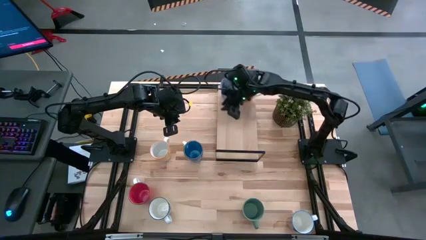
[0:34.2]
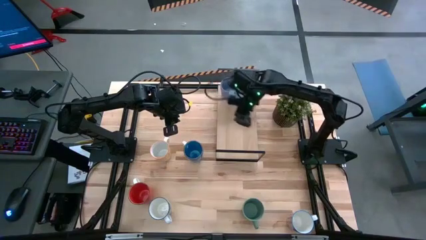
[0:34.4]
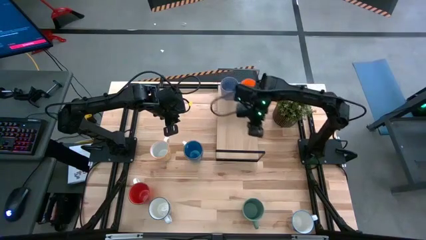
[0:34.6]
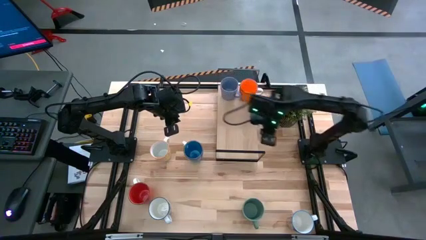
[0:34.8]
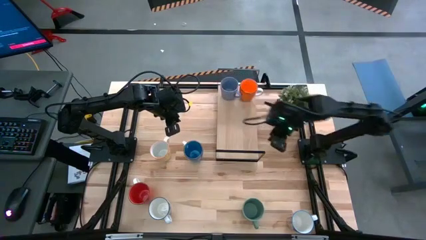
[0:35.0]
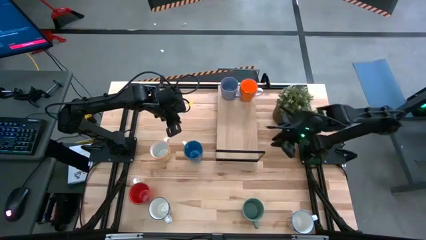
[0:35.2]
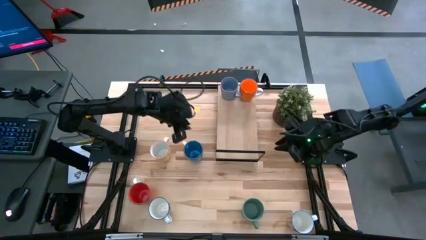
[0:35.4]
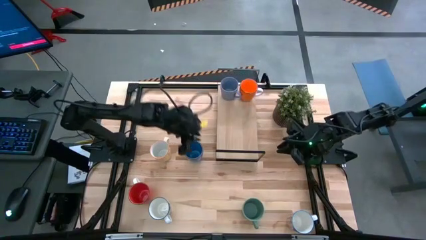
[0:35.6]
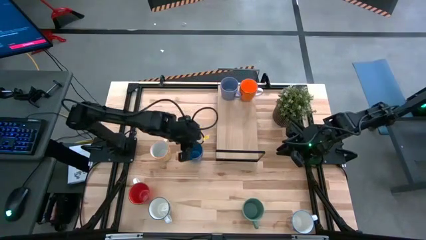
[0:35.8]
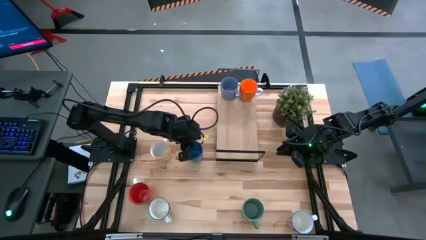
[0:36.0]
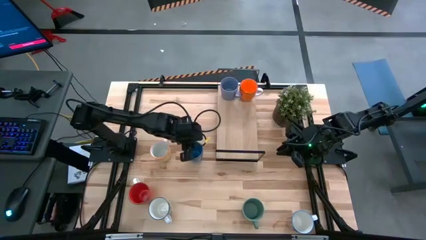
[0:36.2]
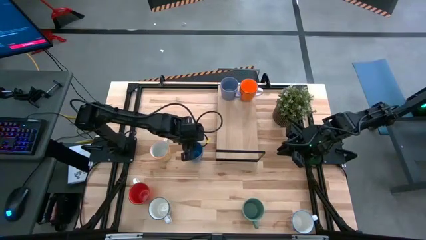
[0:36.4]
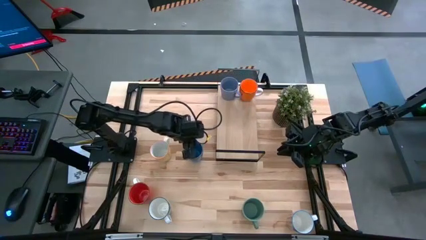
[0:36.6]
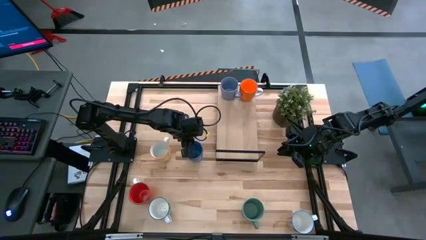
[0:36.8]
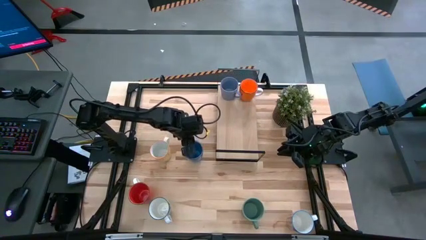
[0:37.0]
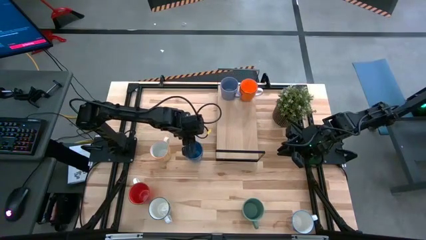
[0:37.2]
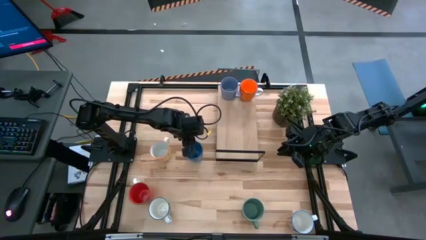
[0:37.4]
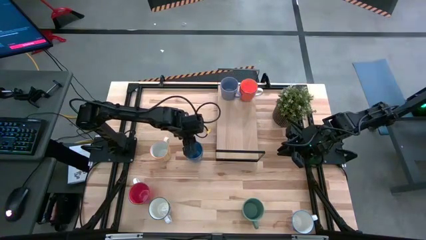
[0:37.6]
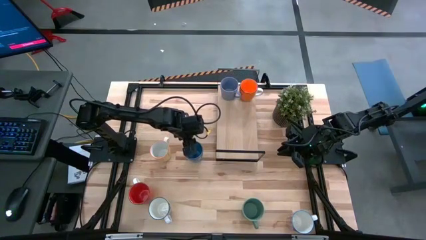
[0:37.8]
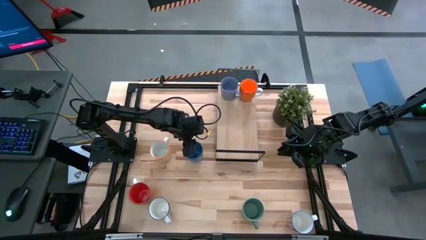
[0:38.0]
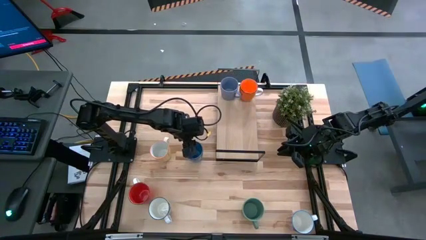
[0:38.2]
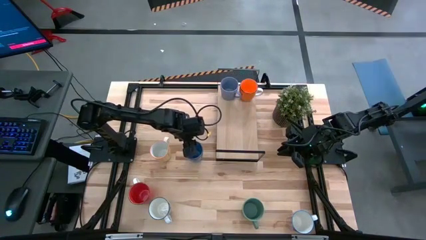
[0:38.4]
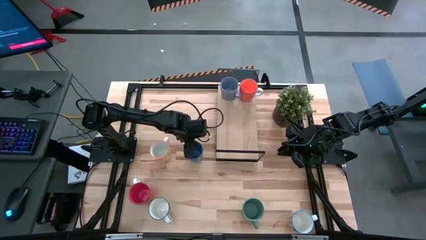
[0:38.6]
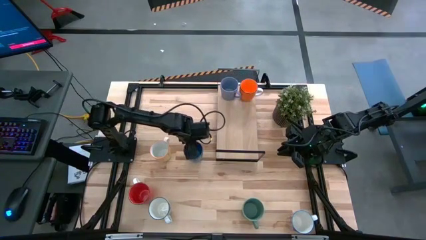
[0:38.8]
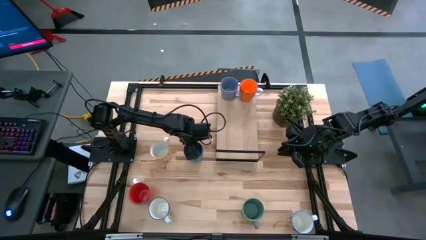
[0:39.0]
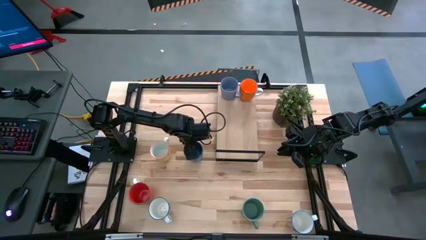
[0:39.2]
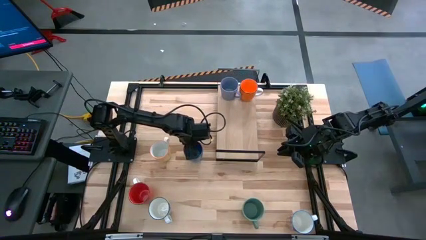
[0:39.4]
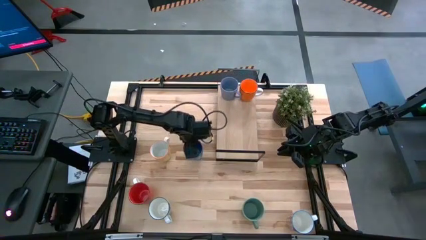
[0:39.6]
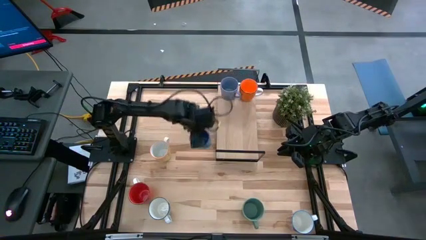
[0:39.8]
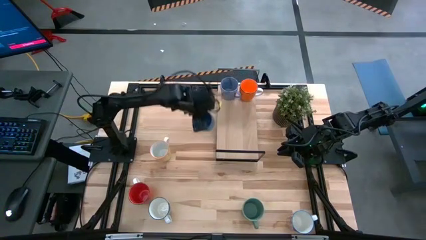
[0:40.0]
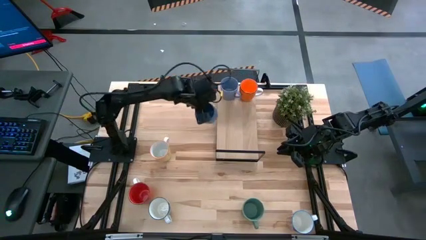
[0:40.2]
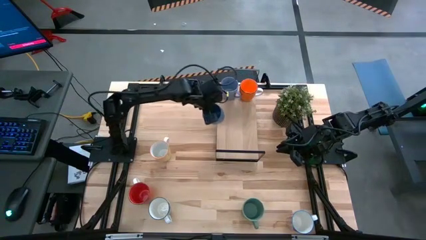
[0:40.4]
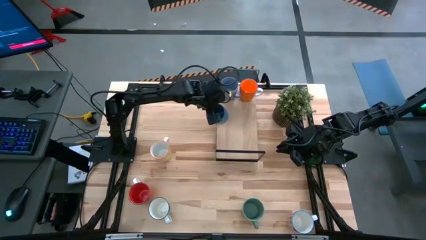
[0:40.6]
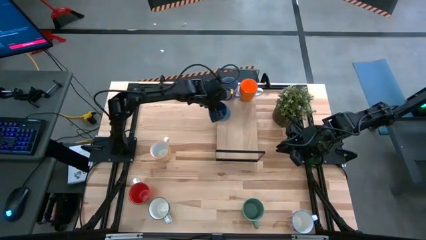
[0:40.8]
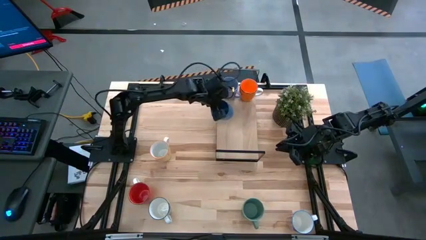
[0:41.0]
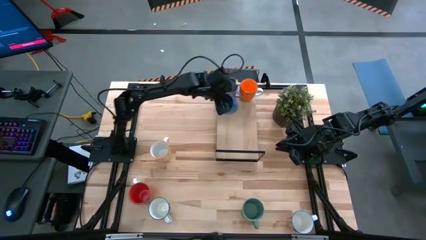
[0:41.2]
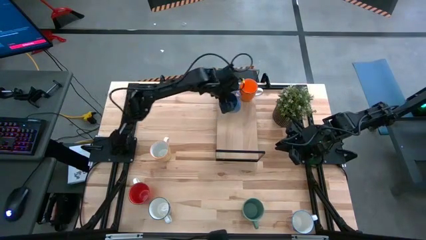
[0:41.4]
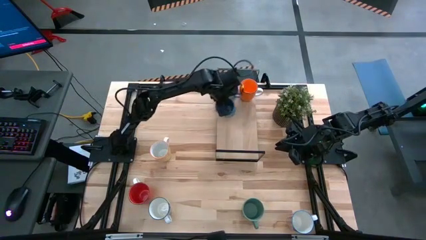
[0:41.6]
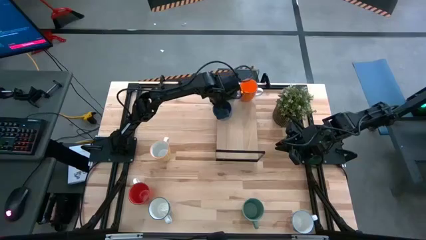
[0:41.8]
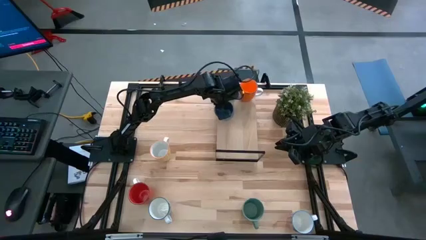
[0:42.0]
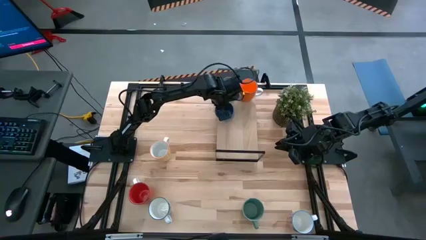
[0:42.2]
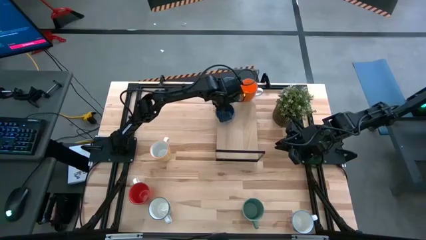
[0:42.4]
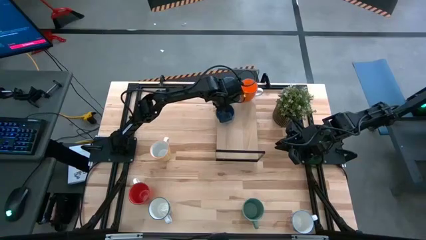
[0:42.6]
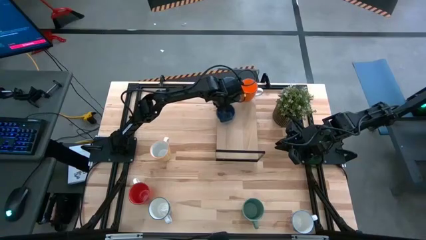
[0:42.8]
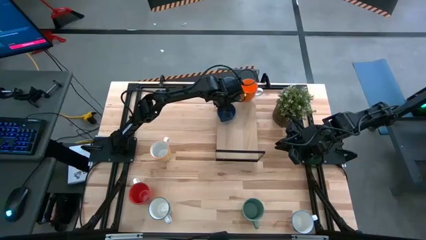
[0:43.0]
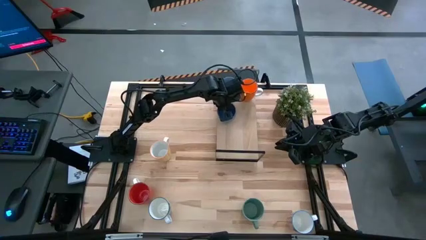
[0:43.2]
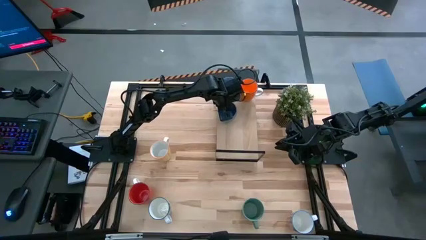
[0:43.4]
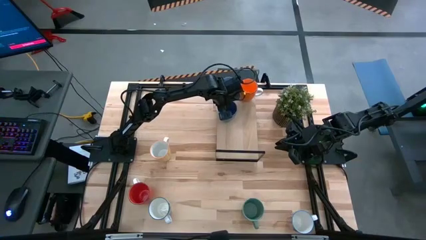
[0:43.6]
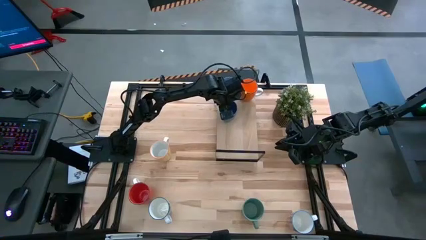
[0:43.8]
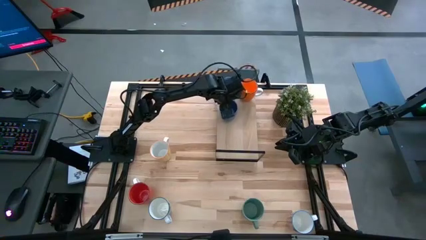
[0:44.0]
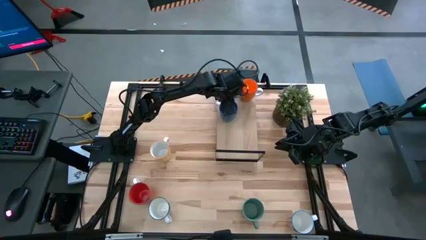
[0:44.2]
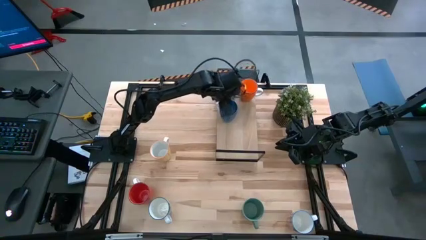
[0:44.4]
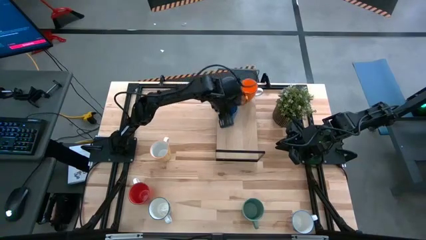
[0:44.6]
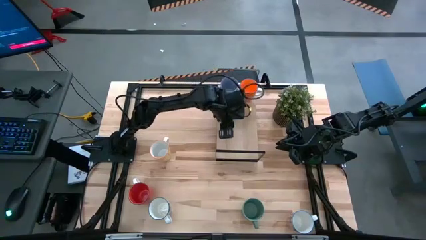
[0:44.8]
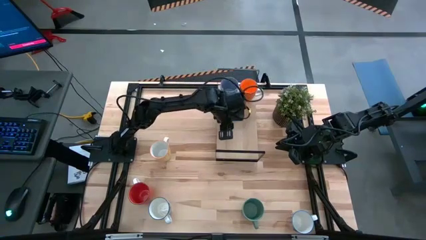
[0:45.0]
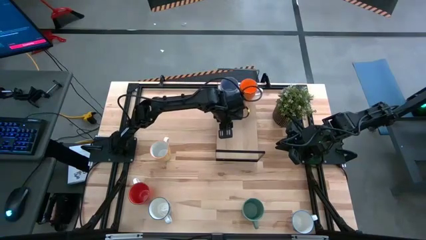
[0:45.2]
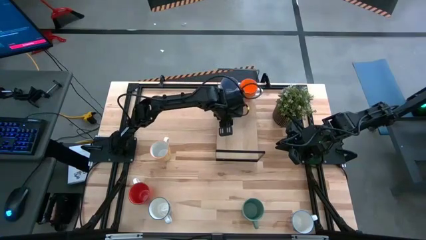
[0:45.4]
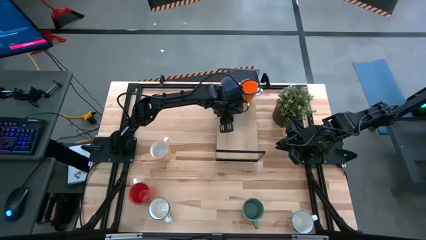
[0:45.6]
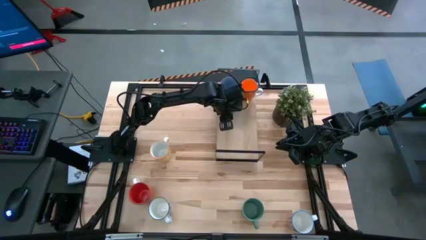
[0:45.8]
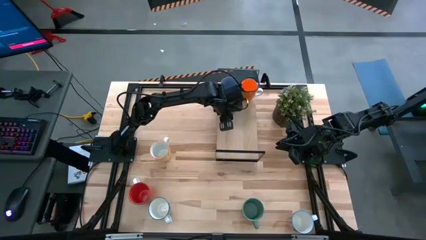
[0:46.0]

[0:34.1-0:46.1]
Task: Place coffee mugs
Put the dark blue mug on the shelf next to the light blue mug

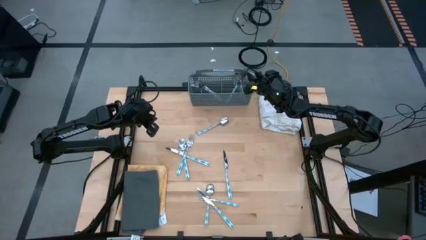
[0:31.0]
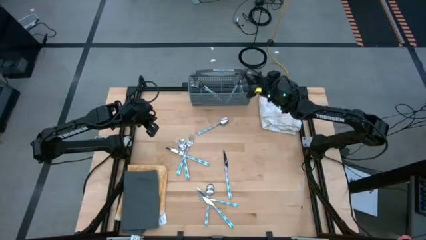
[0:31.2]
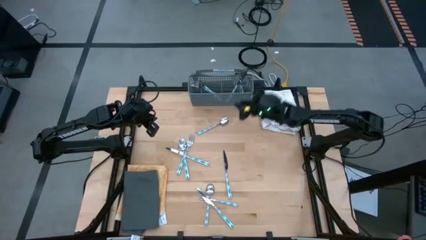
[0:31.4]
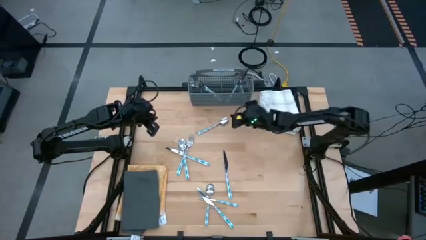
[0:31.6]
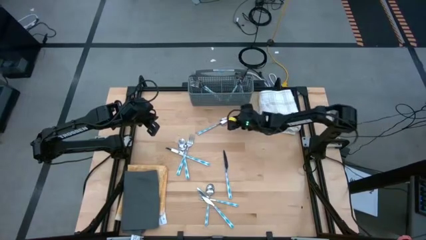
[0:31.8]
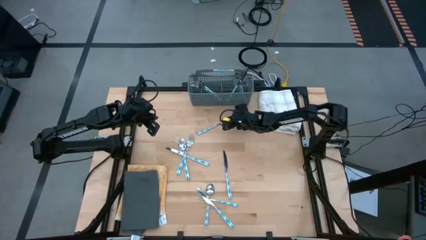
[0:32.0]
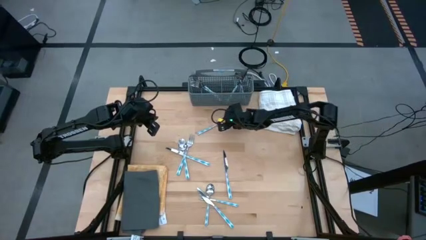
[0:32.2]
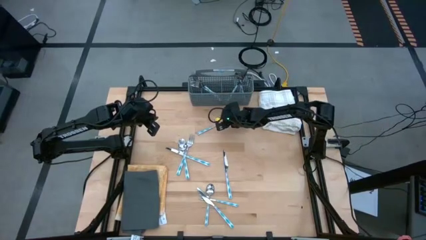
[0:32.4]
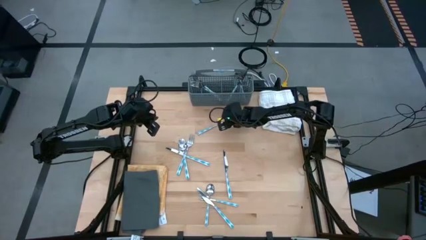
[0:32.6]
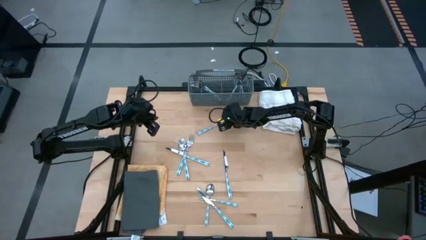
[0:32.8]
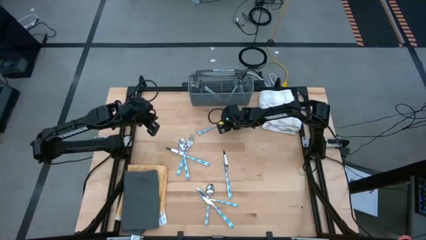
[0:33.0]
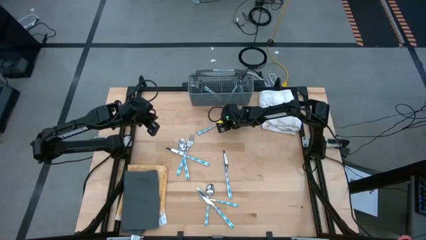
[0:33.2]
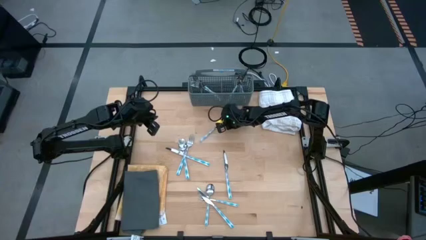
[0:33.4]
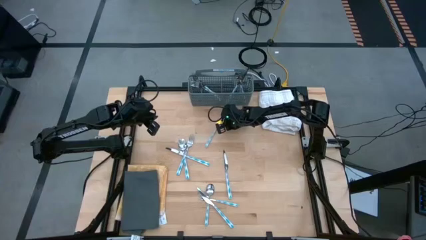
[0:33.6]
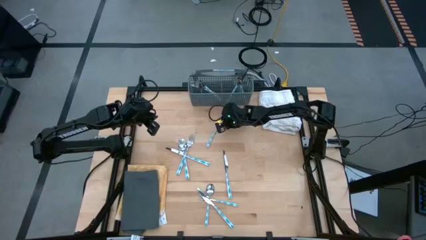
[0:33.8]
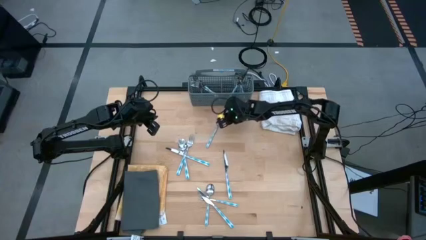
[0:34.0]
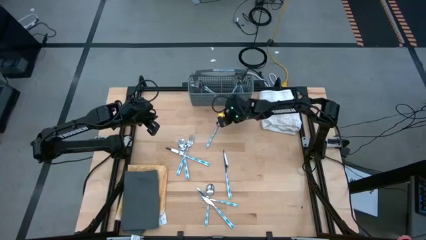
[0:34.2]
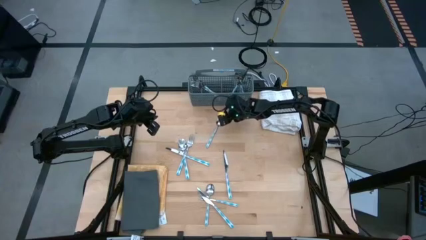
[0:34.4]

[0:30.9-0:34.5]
Task: Sort silverware
Put the top blue spoon into the gray silverware rack

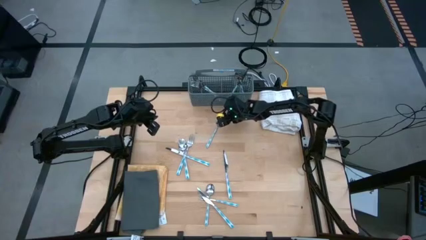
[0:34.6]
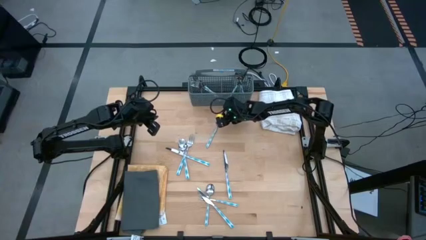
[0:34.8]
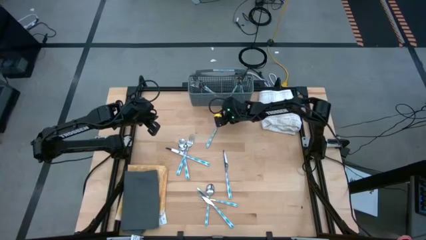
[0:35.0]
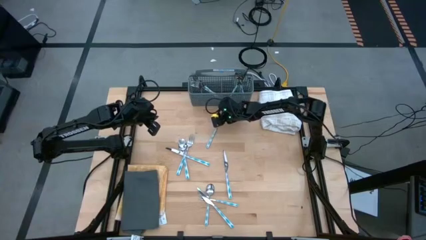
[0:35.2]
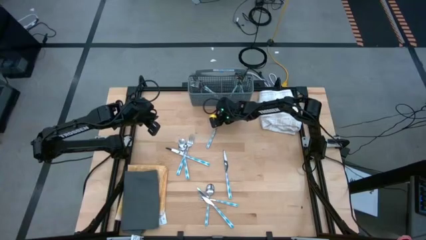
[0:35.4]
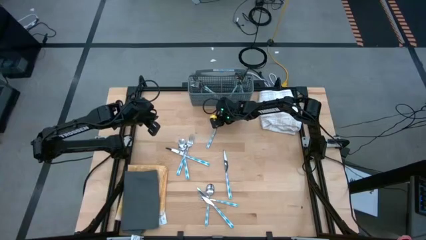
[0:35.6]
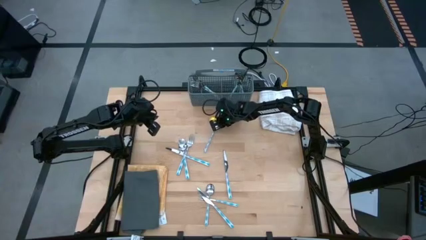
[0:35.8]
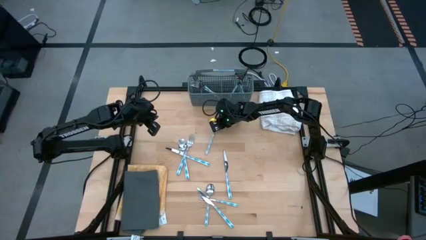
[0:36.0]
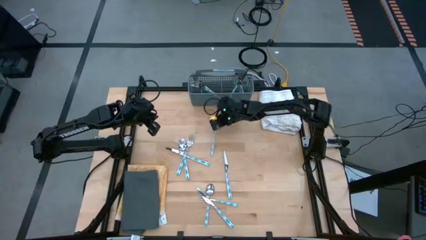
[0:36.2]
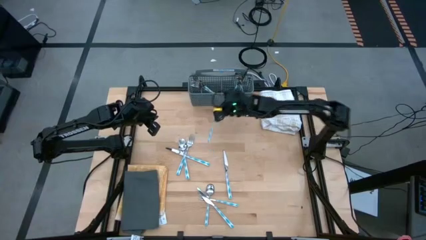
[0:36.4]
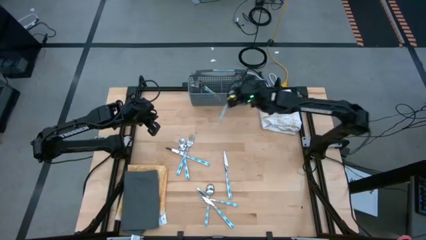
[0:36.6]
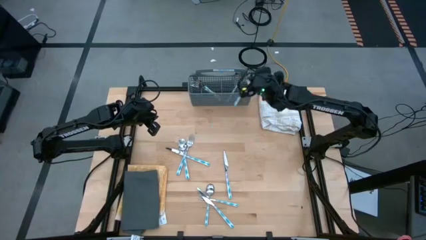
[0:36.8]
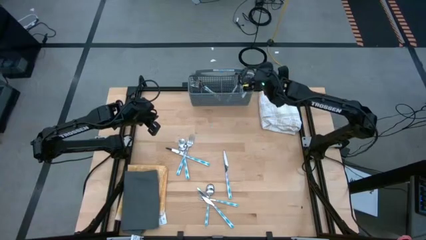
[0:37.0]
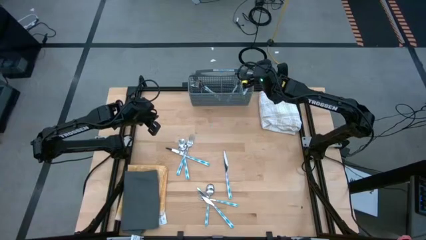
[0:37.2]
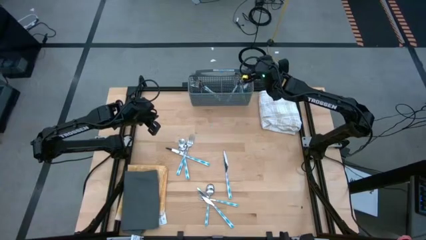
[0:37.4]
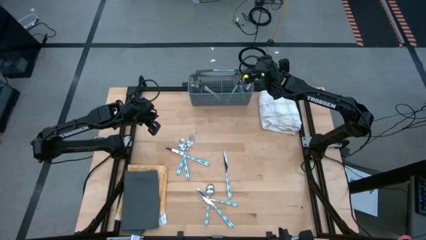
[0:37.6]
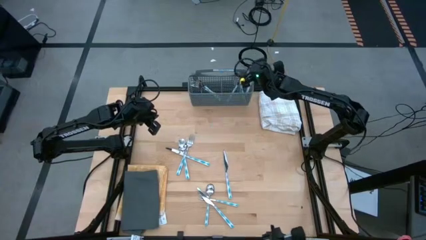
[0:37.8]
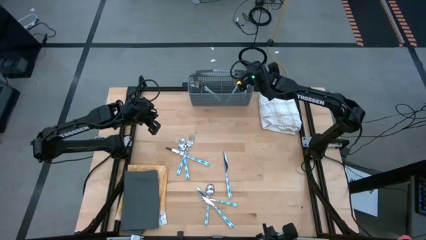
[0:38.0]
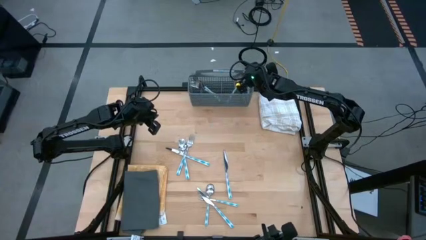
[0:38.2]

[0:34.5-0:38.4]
Put the top blue spoon into the gray silverware rack
